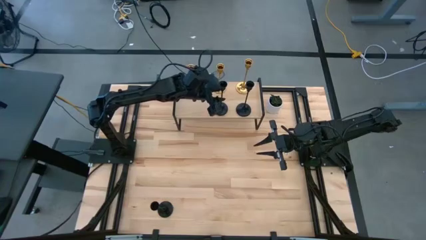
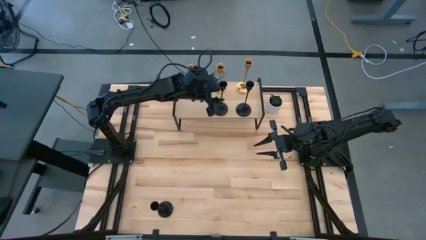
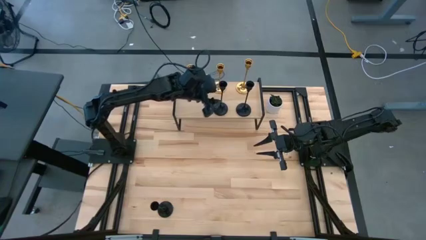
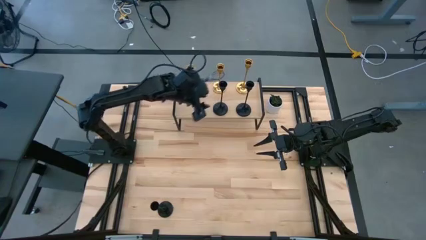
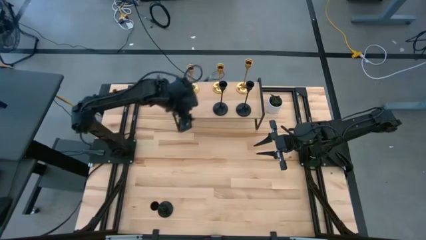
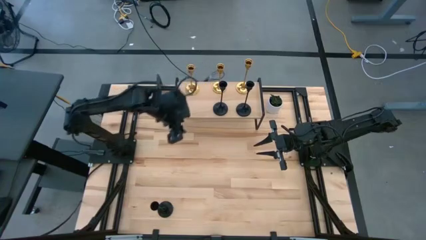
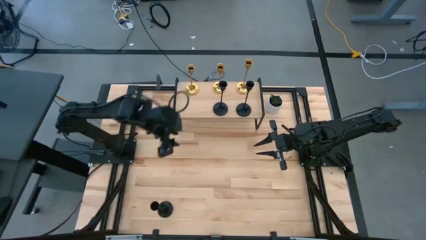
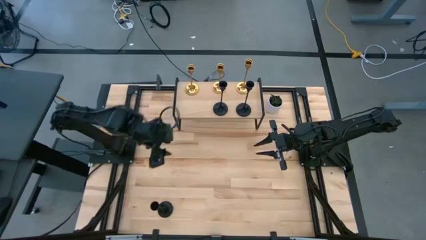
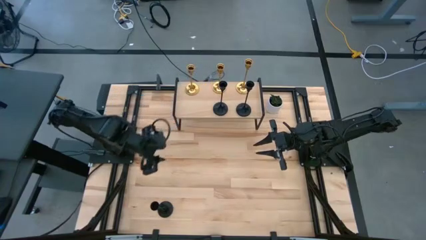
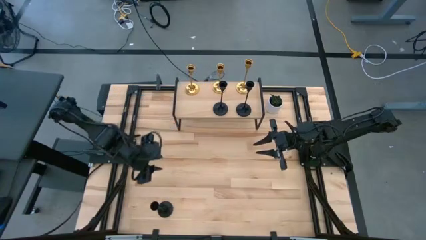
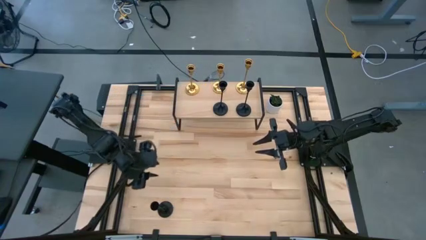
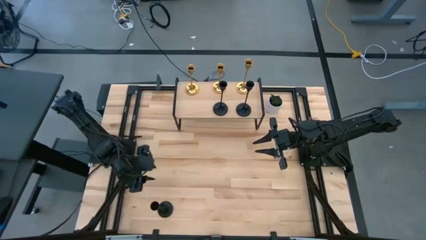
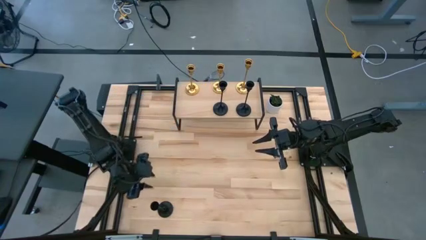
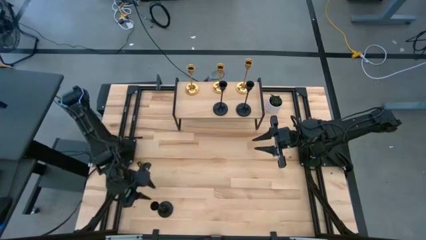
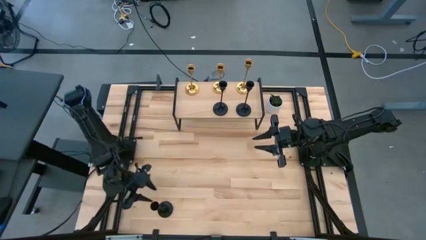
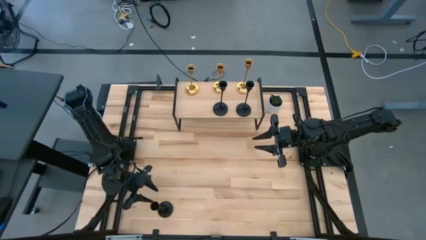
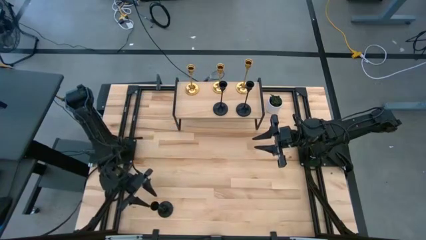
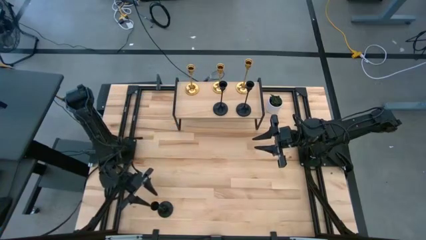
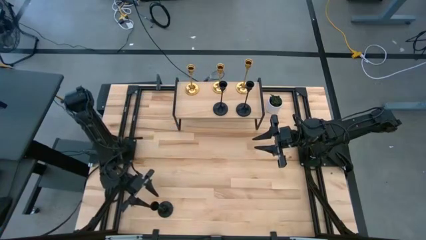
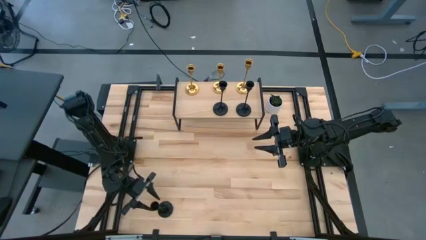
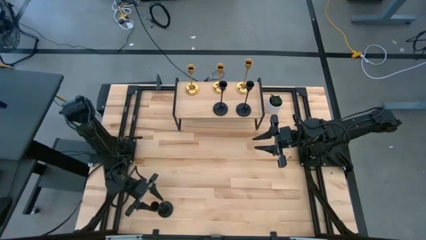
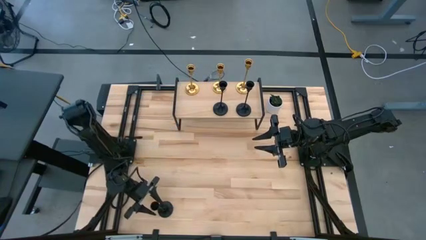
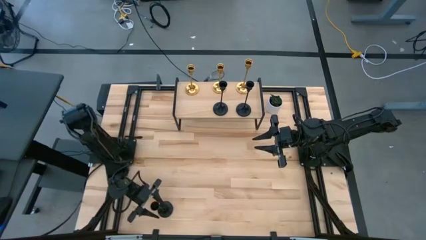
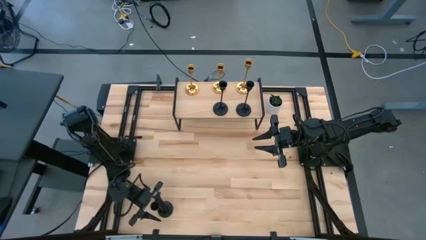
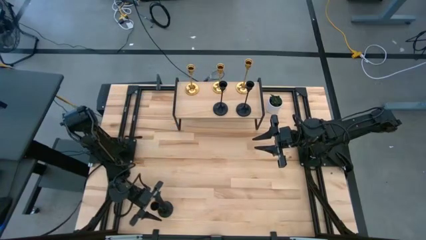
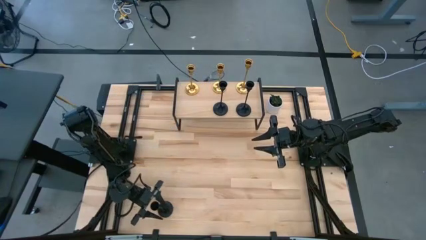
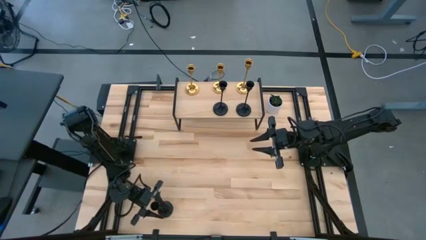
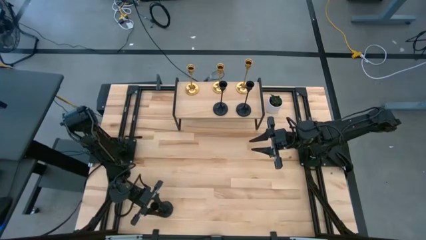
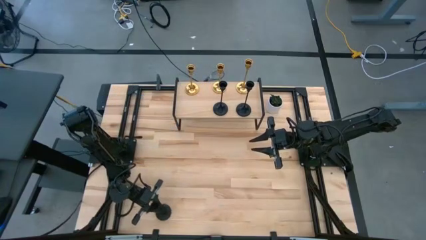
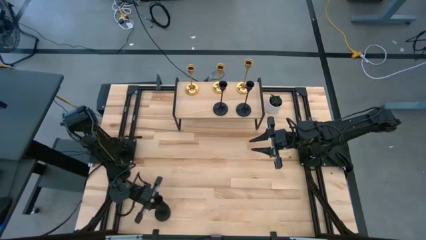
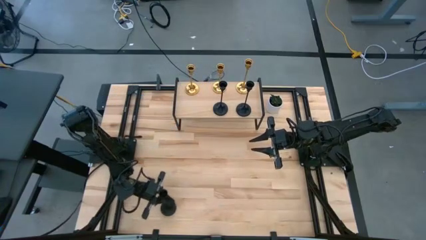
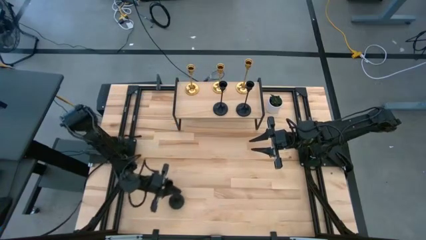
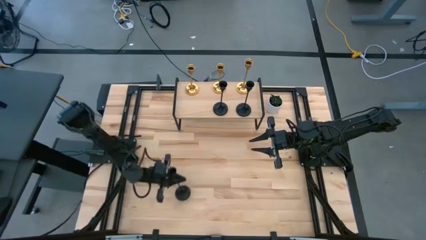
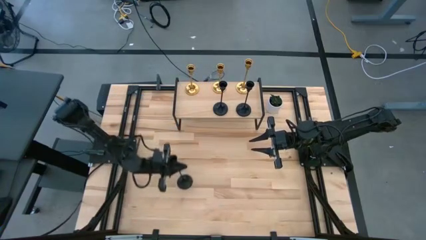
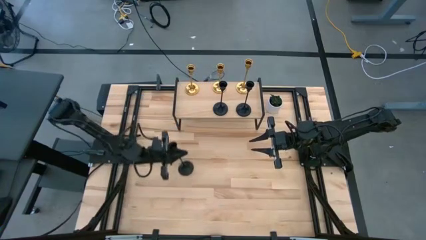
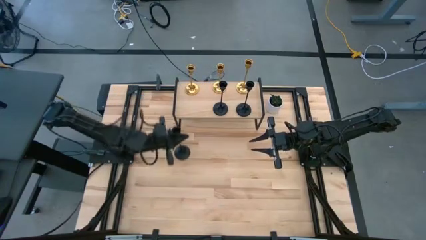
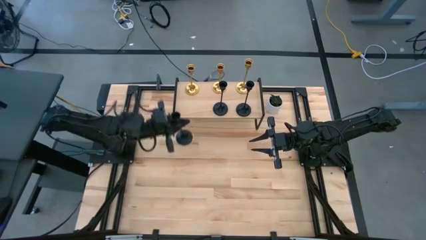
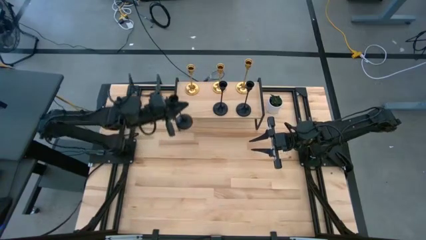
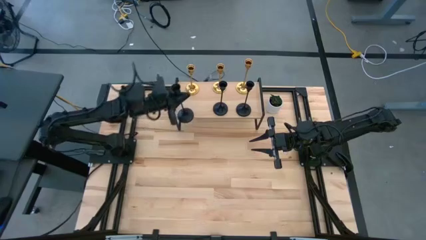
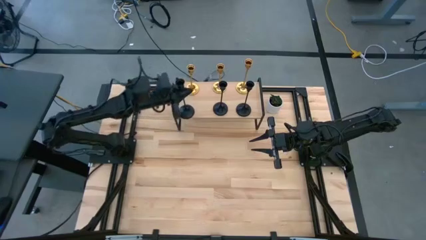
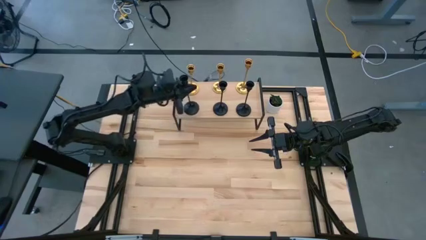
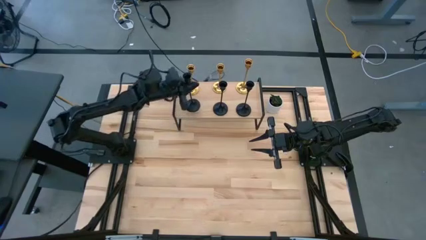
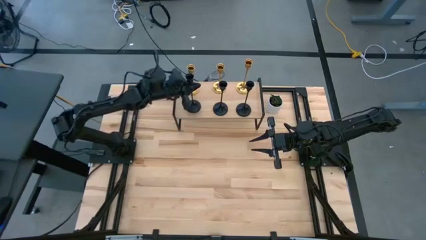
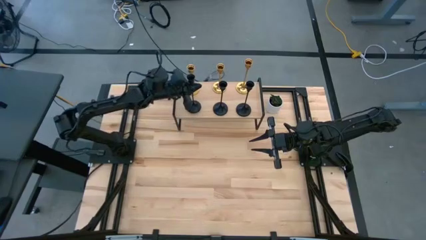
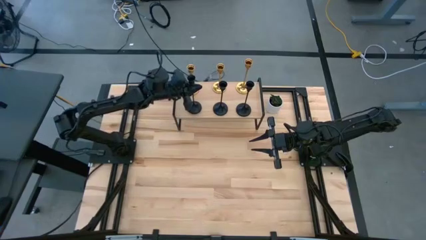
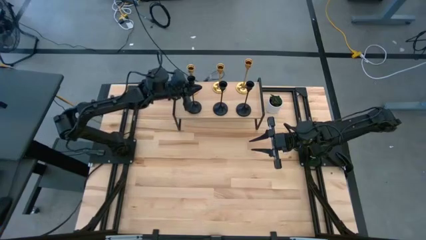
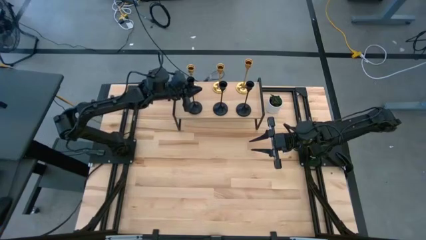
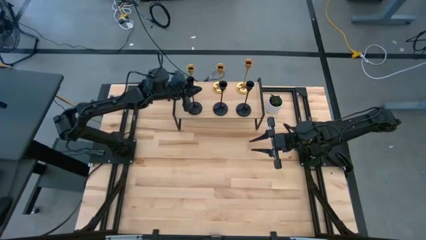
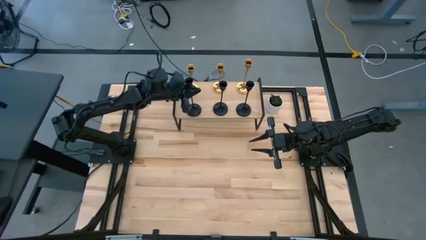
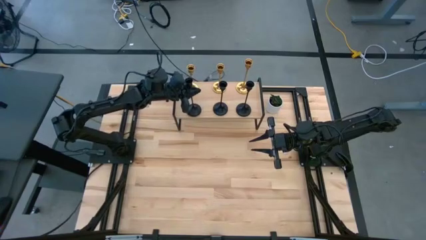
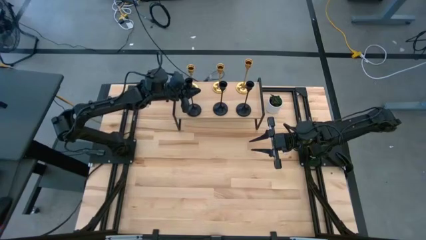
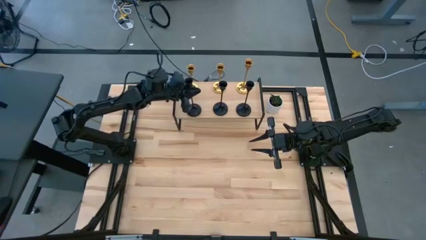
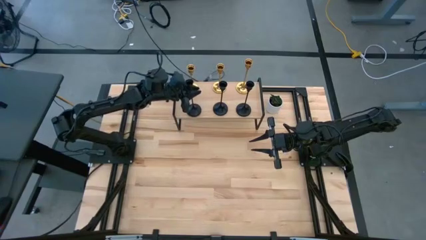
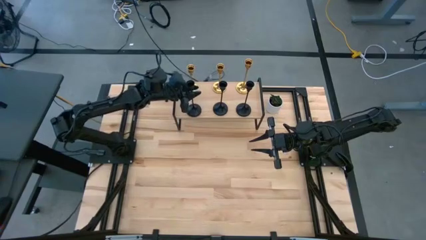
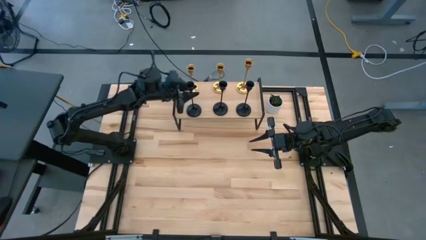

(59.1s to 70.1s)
Task: Pick & Place candle stick holders
Put the black candle holder on the shelf

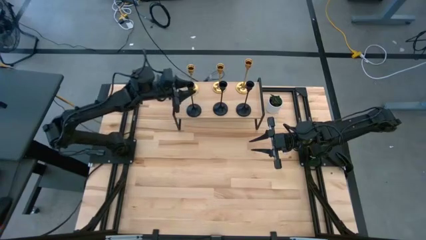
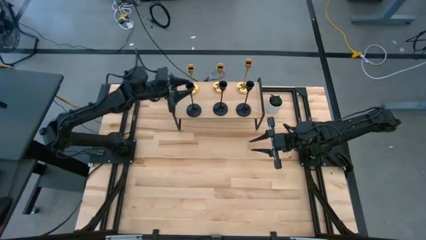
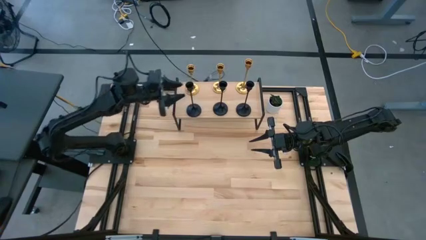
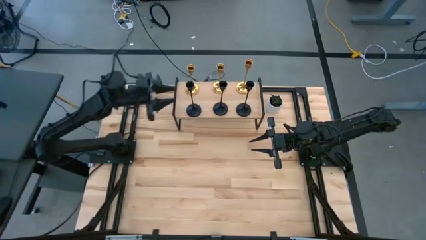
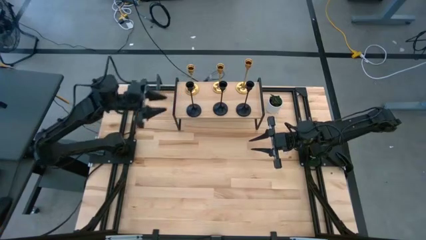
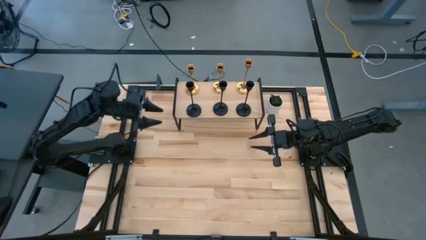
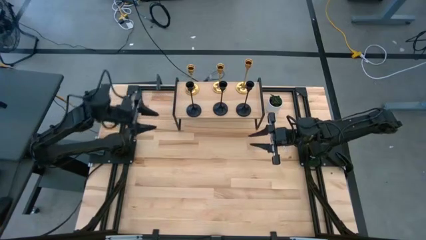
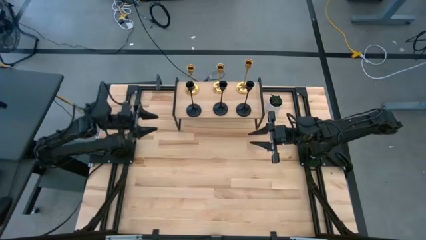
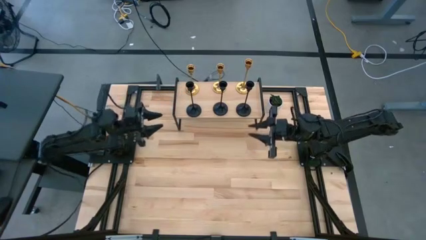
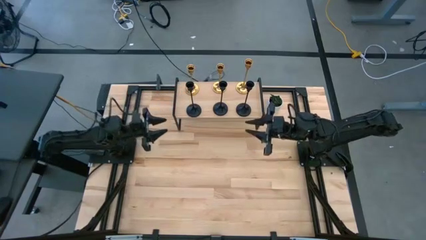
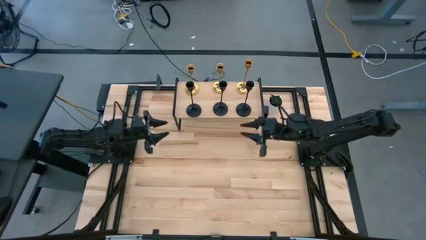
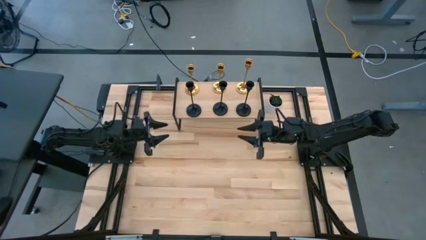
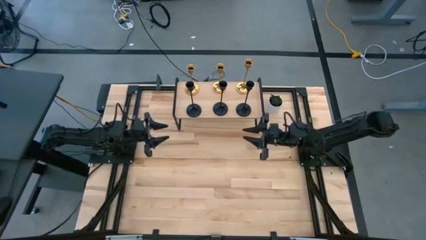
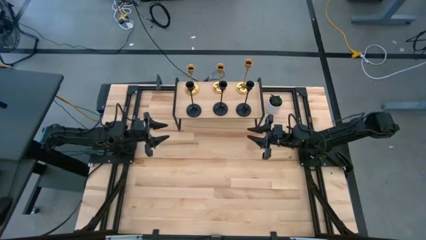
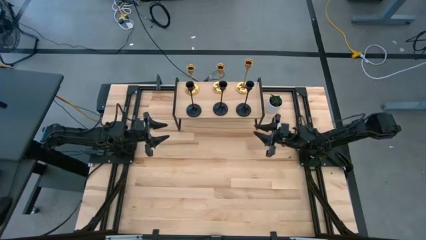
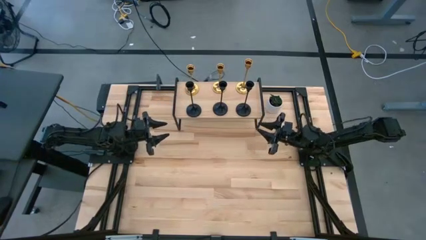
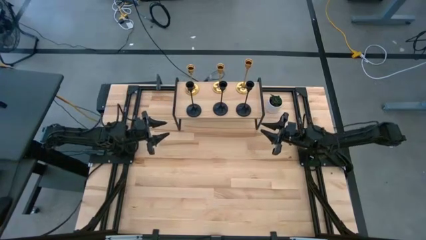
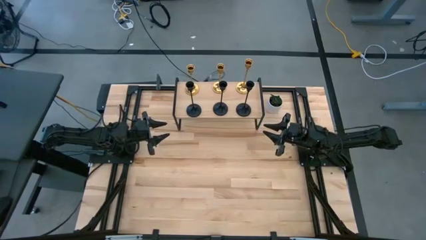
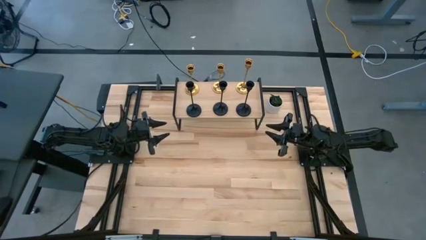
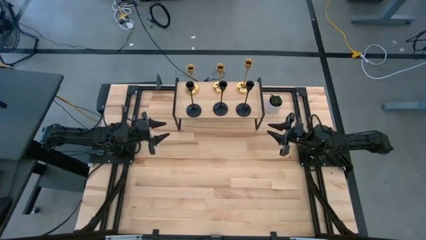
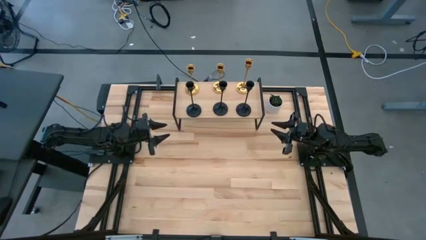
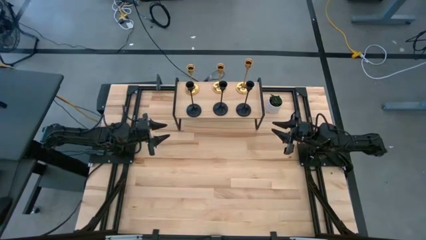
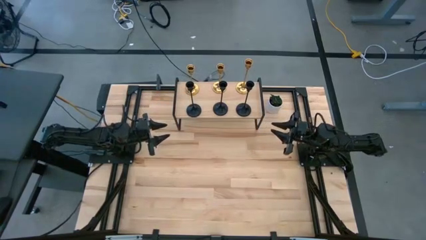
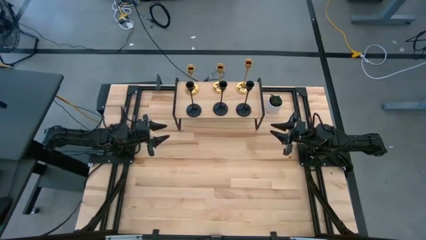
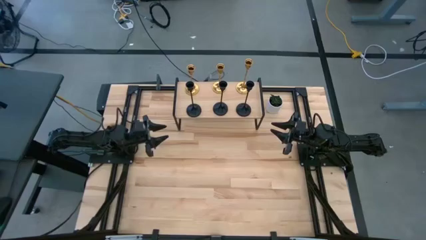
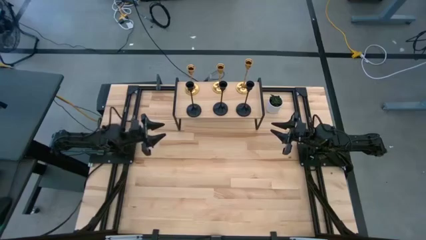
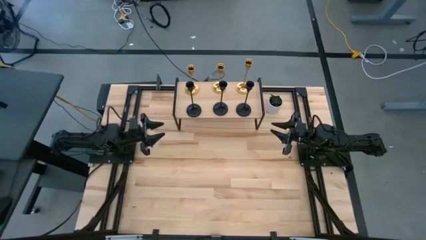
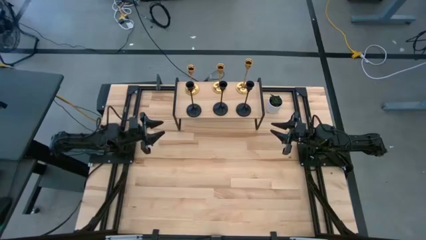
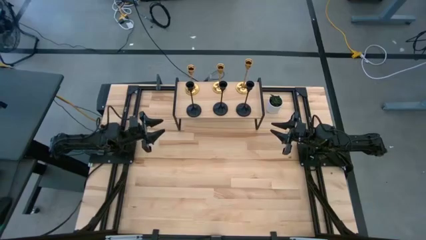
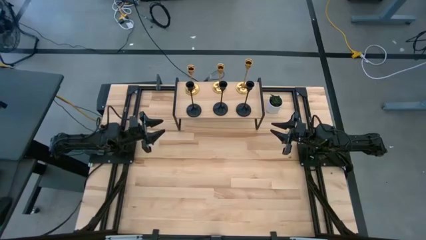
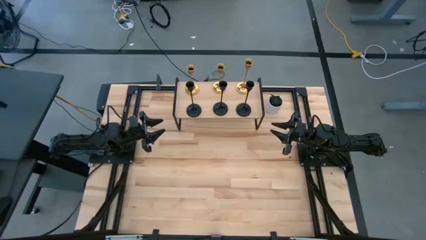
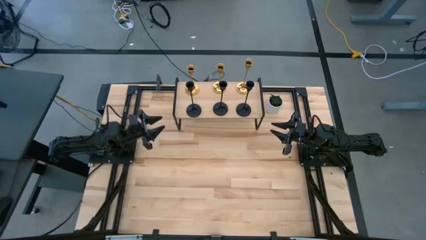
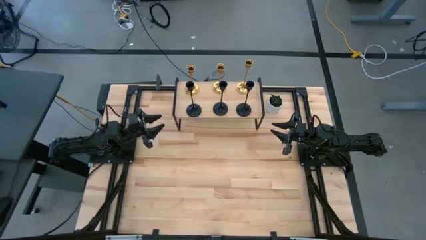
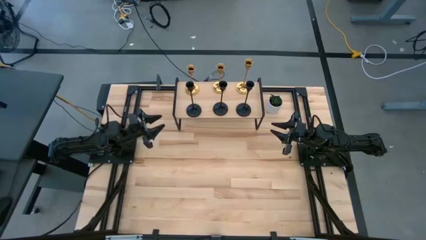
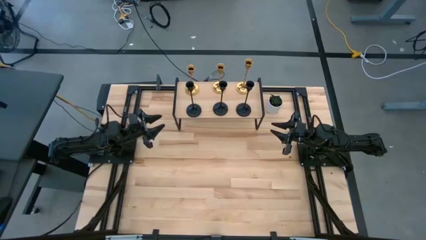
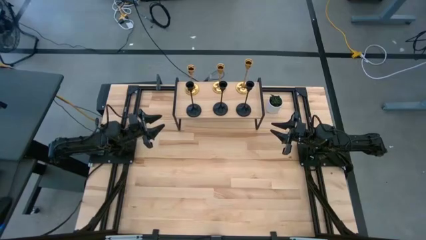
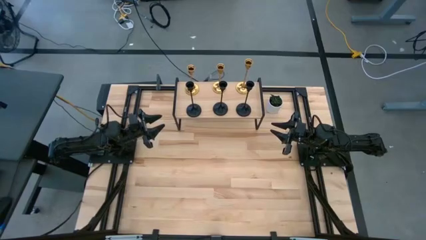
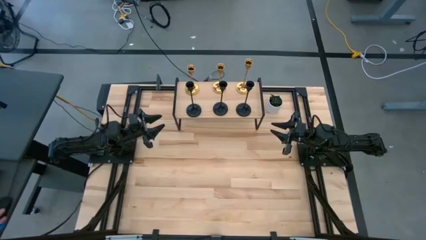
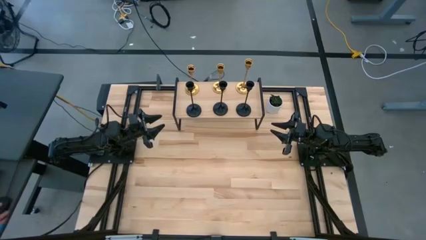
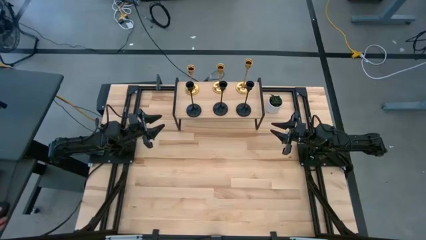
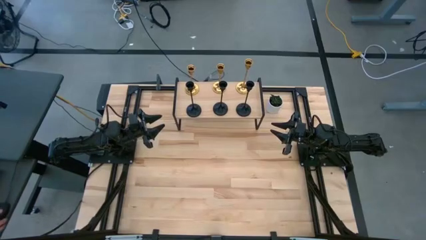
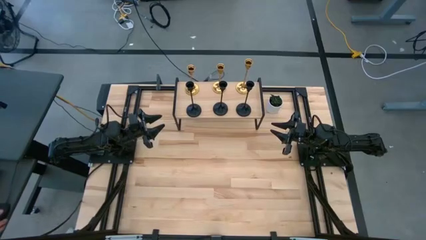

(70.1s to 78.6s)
Return to Home Position
